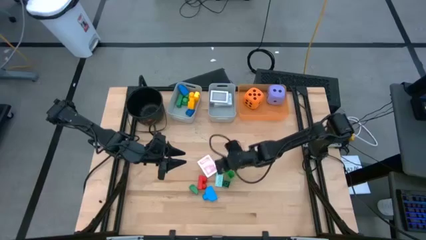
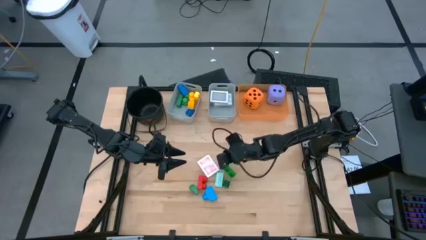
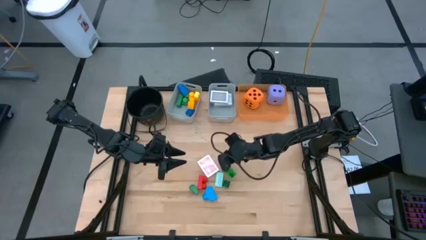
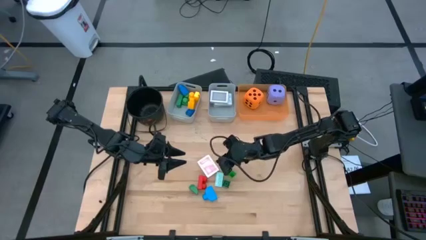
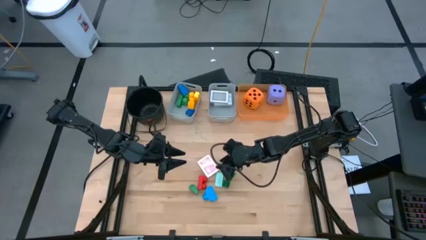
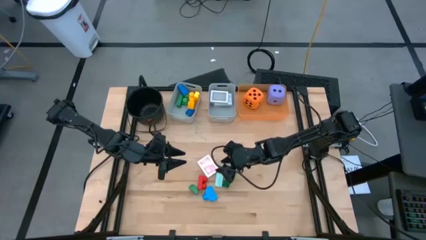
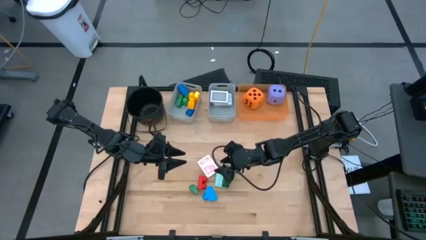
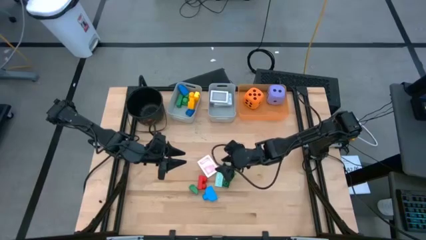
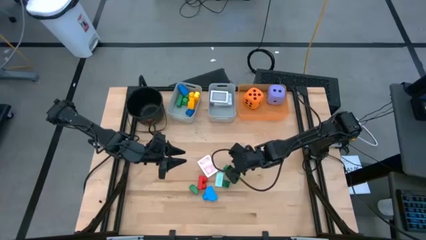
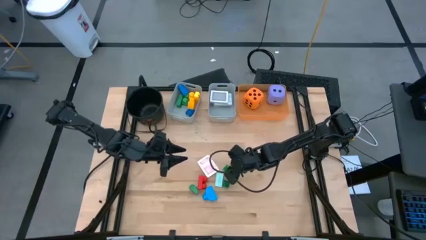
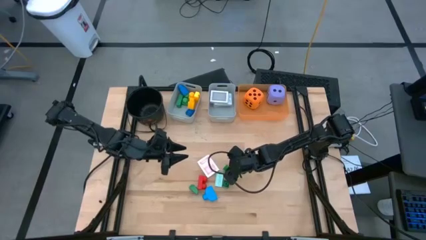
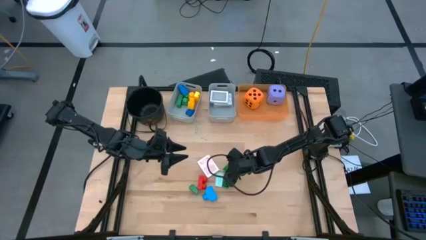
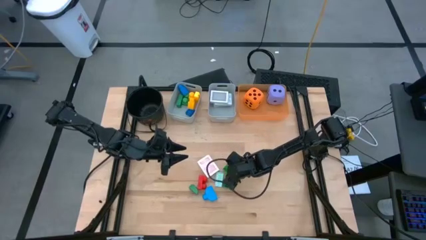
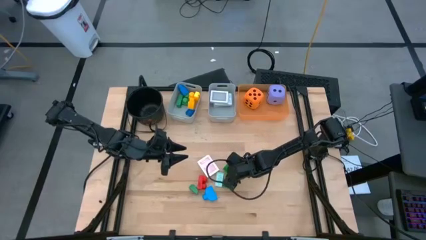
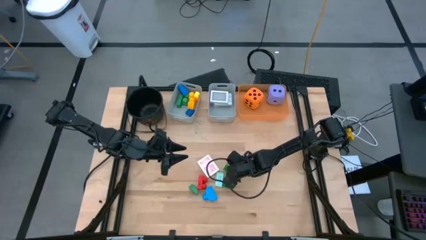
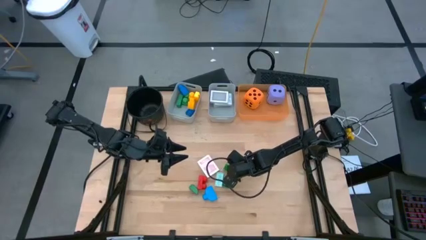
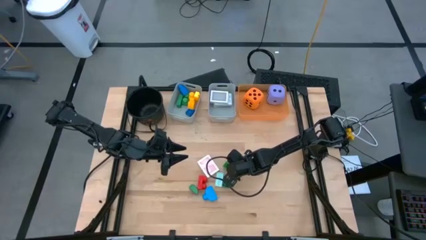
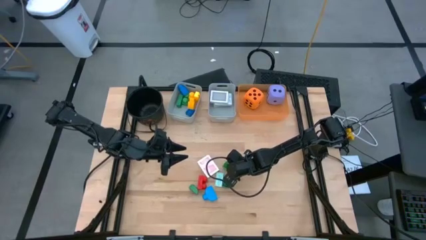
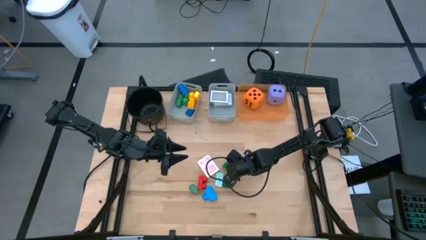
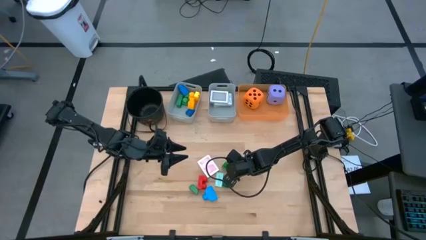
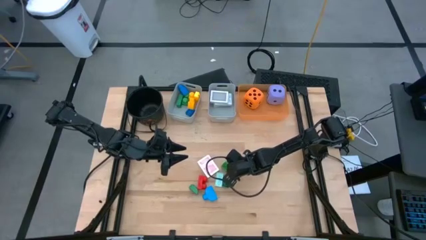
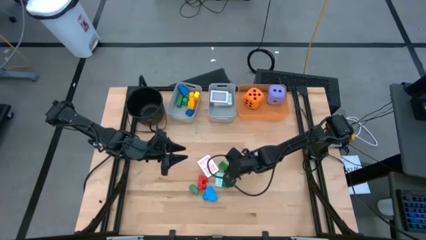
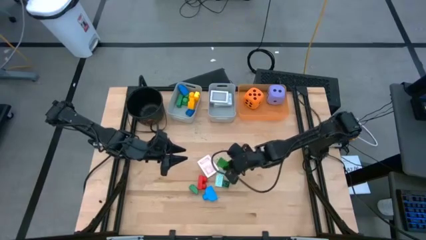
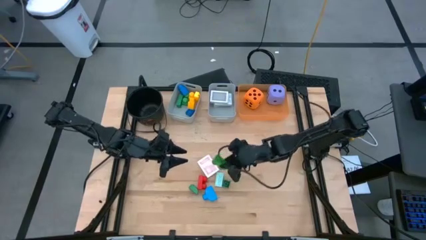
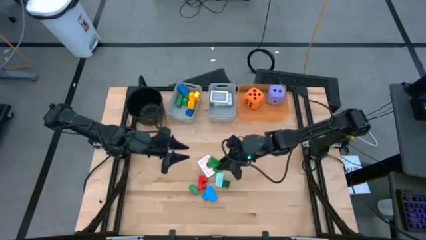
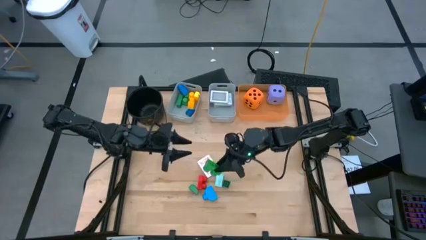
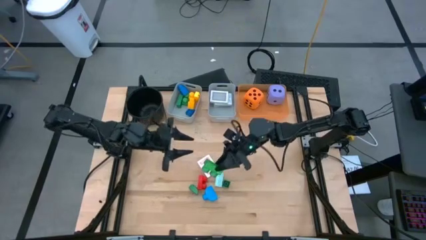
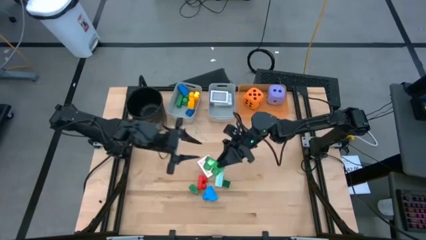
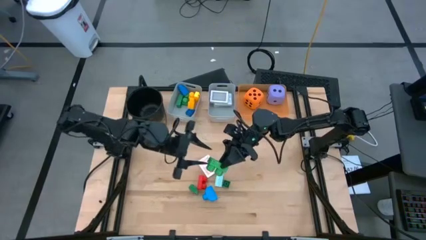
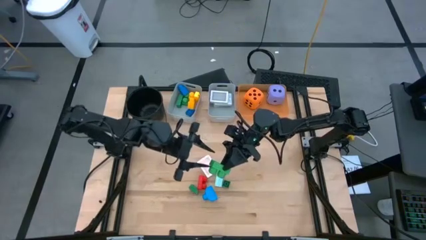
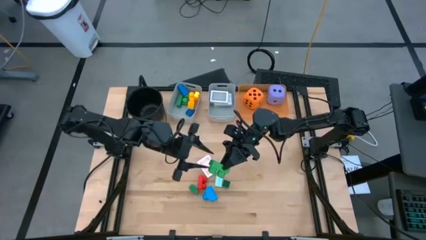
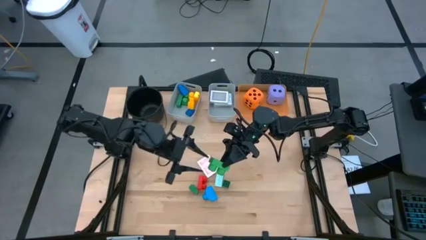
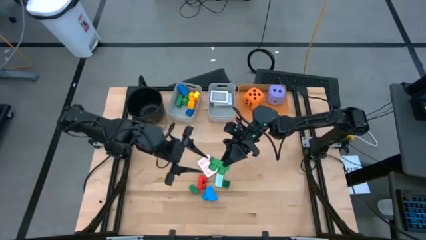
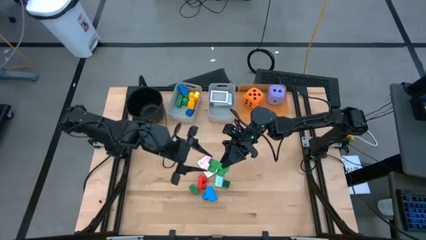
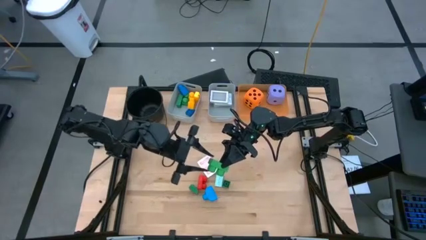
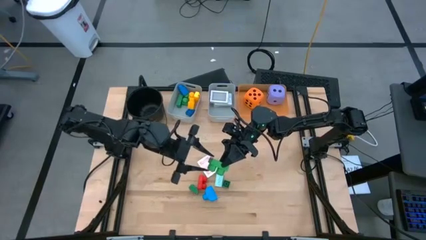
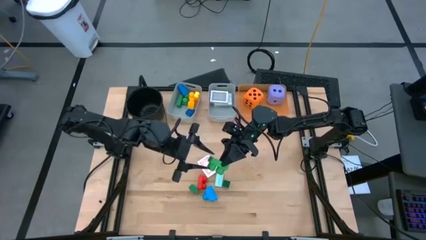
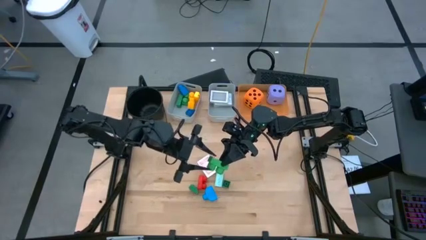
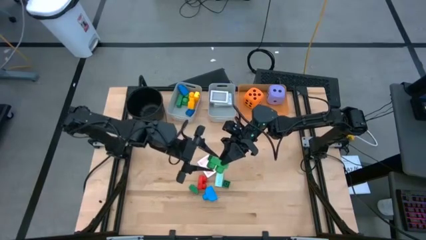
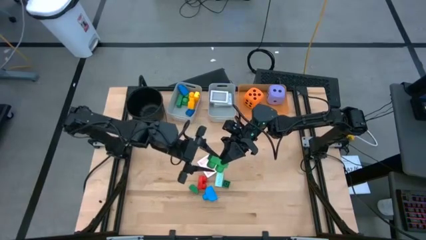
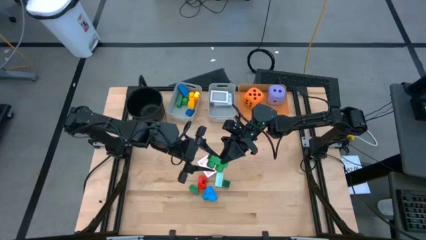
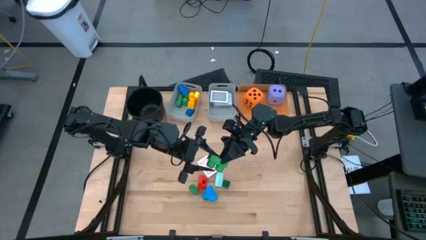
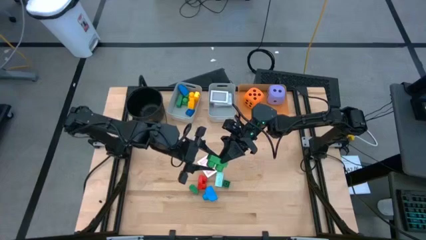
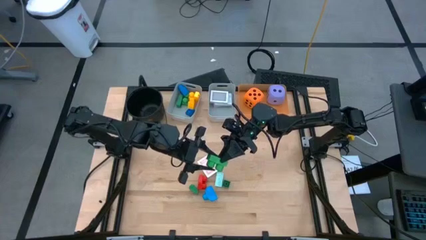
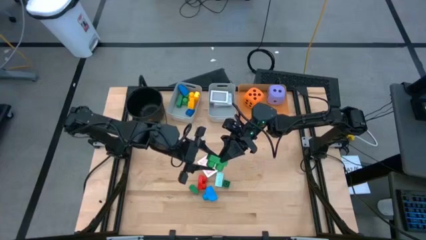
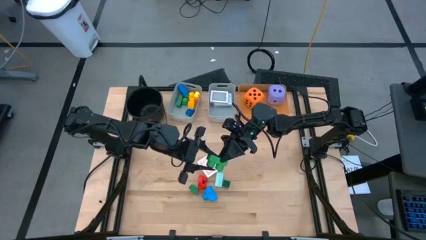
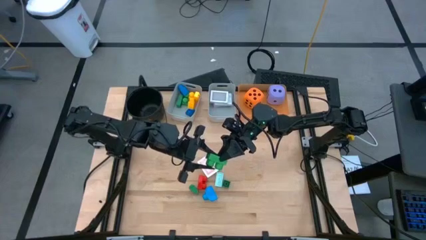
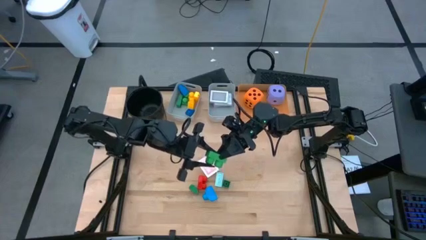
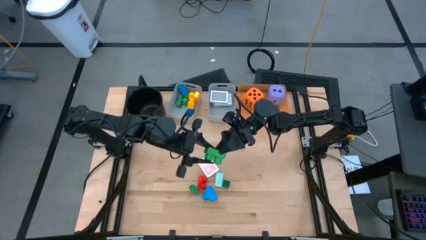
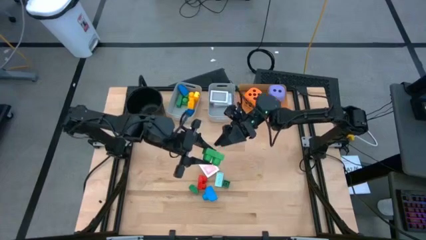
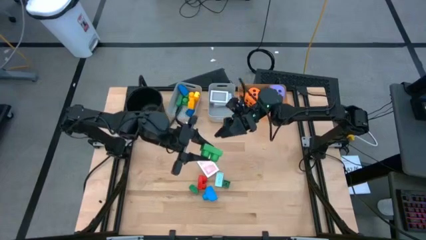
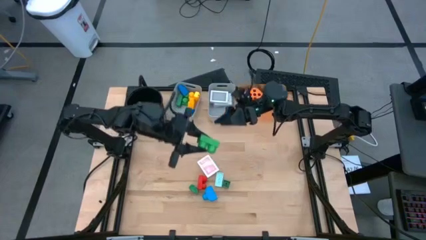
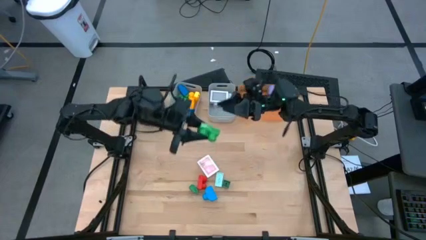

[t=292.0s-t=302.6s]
Task: Pick & Place Toys
Put the green game piece into the left gray bin
